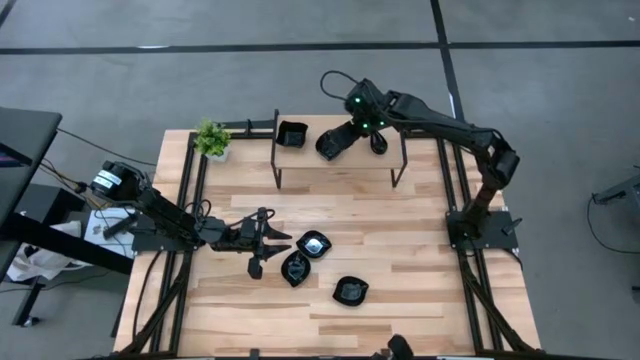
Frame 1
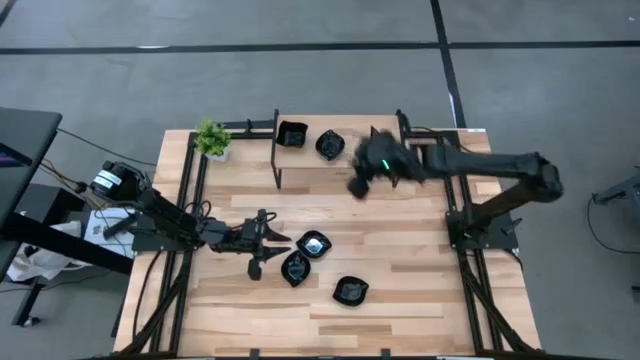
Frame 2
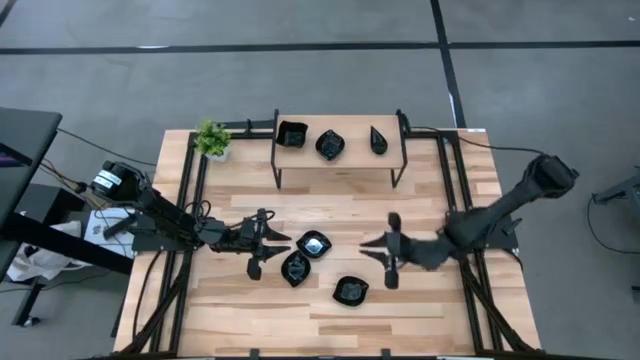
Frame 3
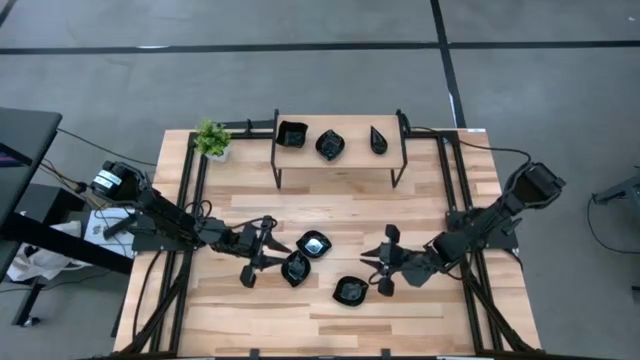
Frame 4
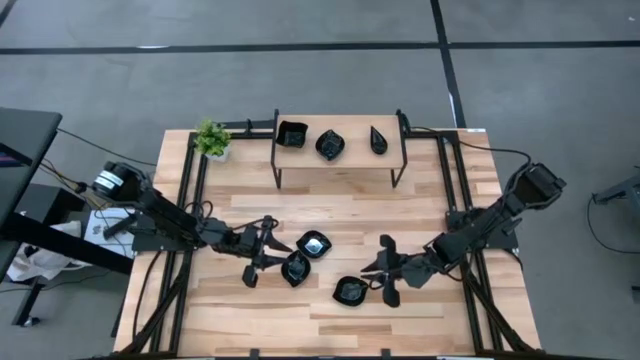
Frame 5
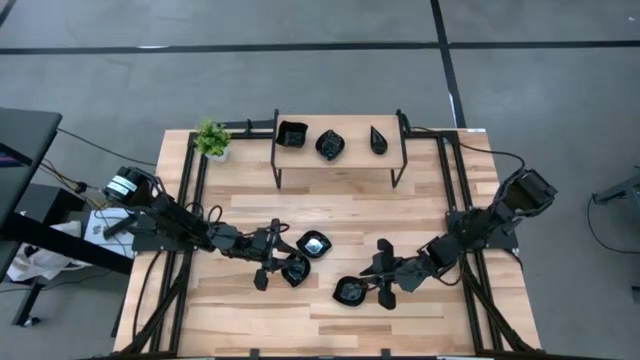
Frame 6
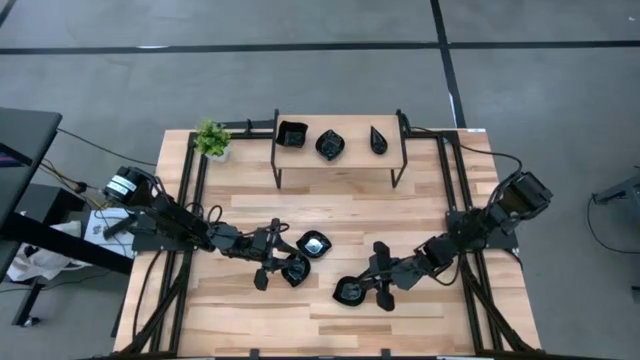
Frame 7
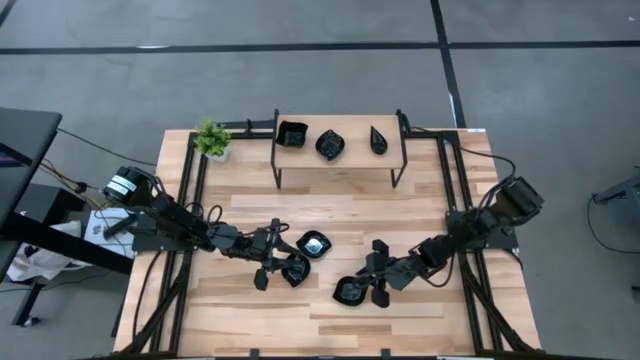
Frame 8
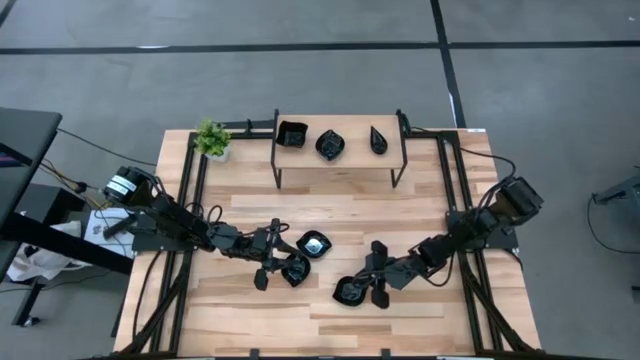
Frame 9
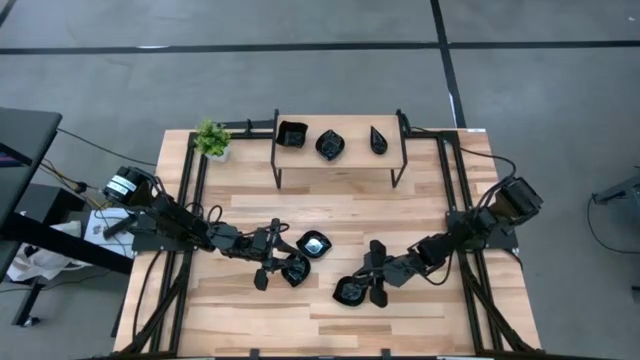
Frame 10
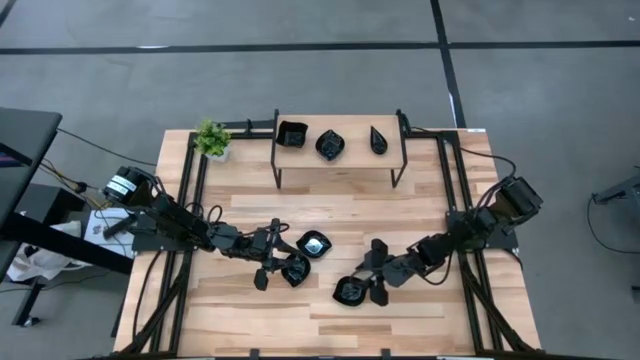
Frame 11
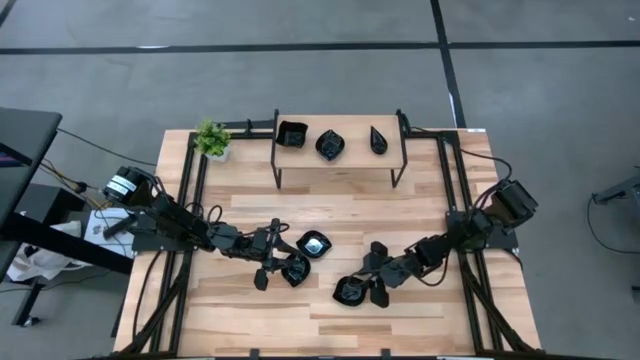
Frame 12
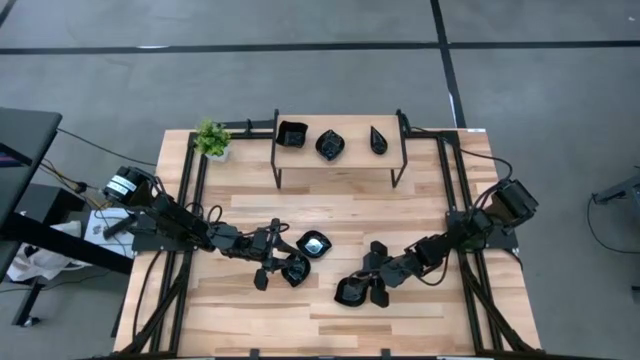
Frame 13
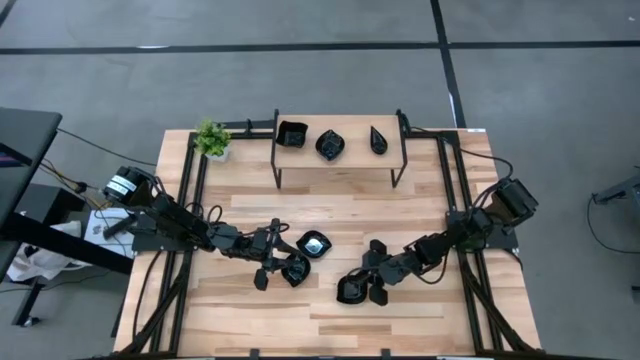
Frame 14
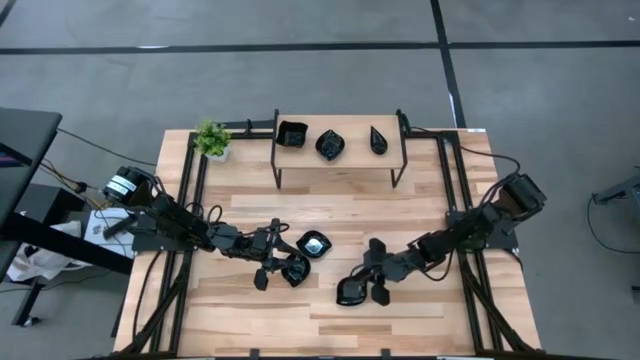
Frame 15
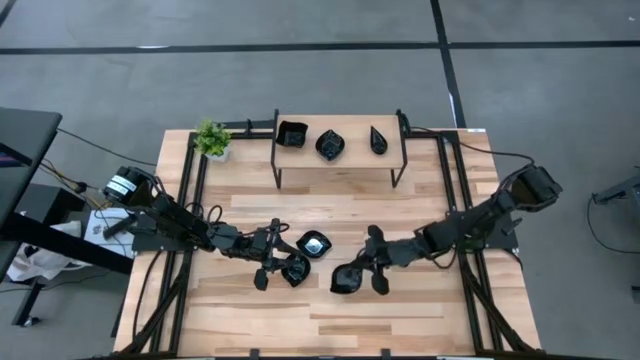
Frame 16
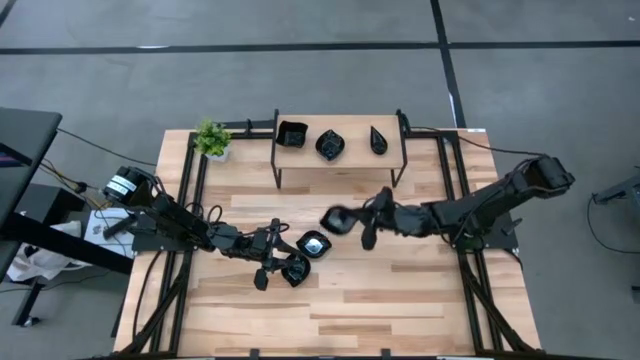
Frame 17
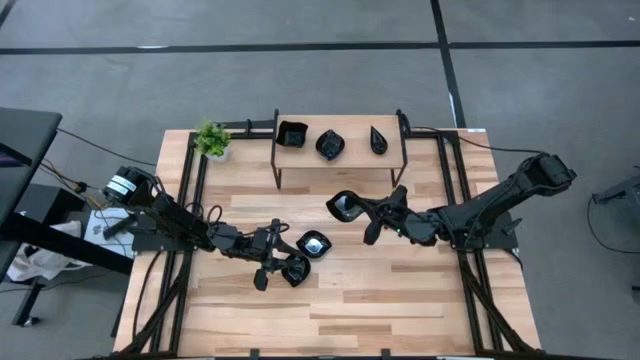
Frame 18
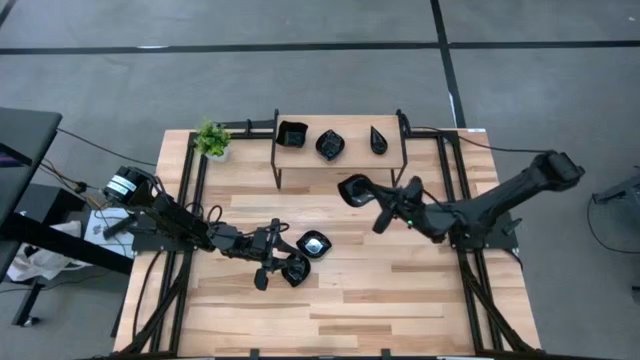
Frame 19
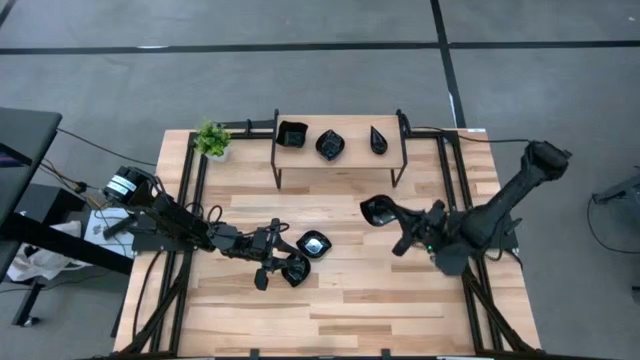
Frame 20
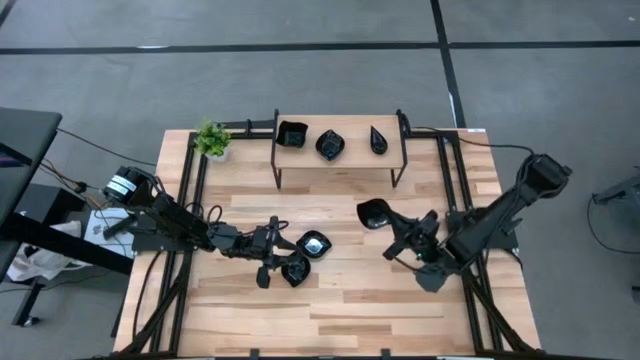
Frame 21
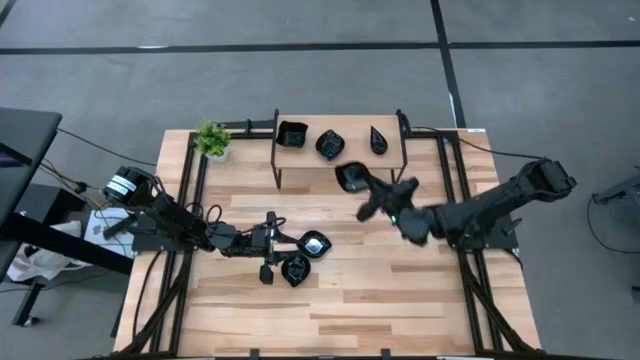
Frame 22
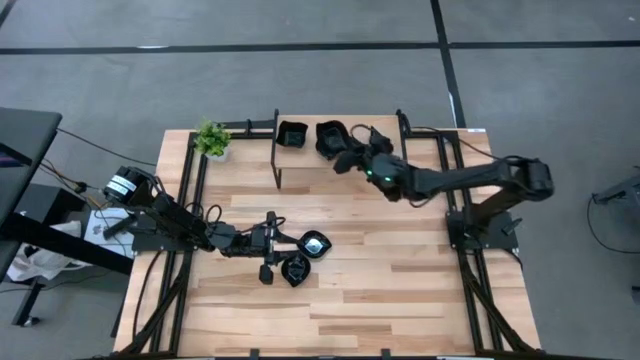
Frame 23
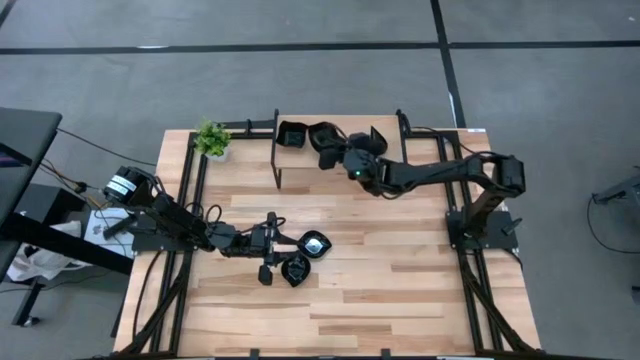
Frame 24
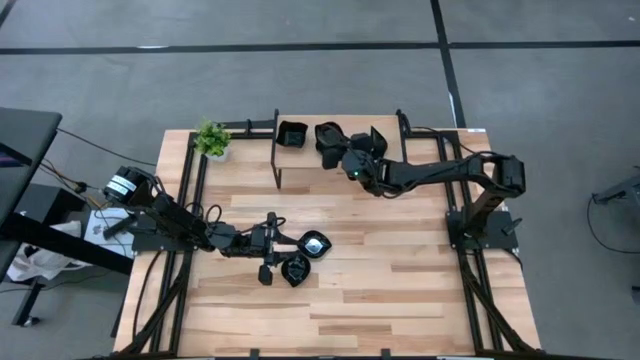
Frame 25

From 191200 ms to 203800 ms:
Task: Pick & Place Mini shaped plates
Stack the black leaf shaped plate on top of the black leaf shaped plate on the shelf

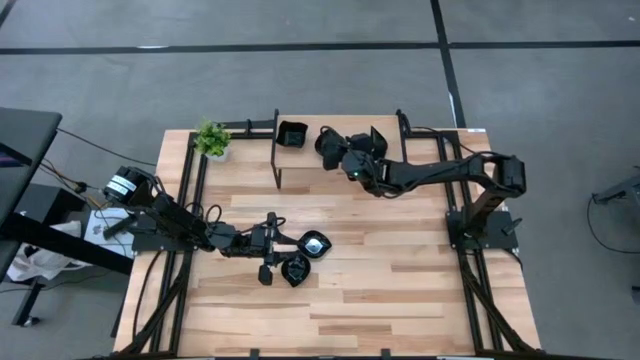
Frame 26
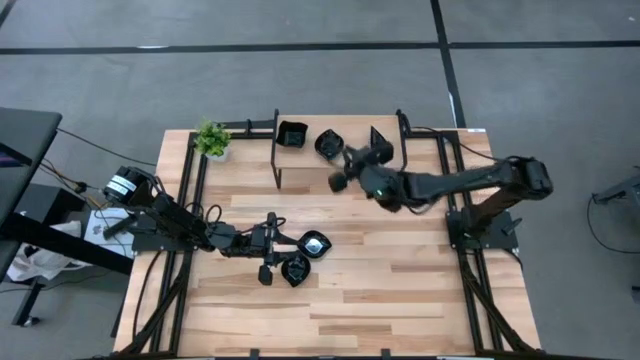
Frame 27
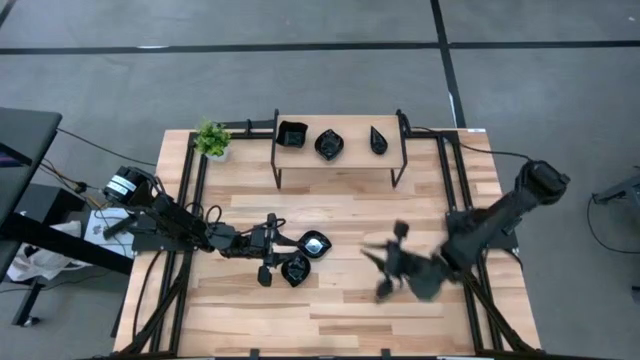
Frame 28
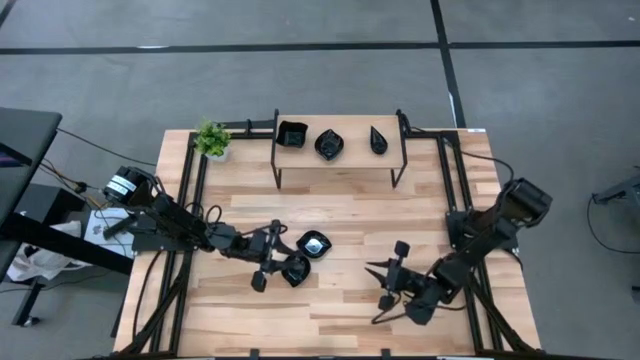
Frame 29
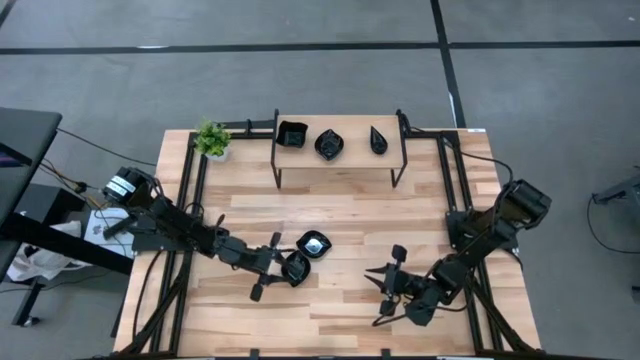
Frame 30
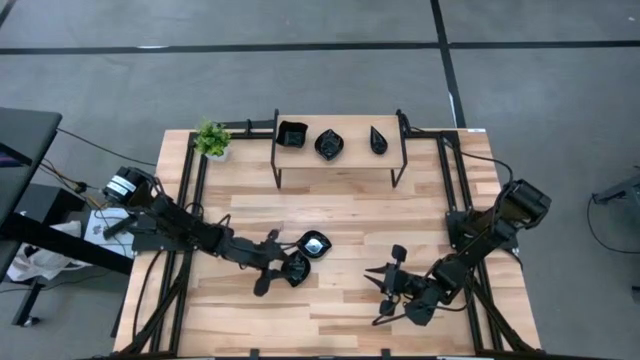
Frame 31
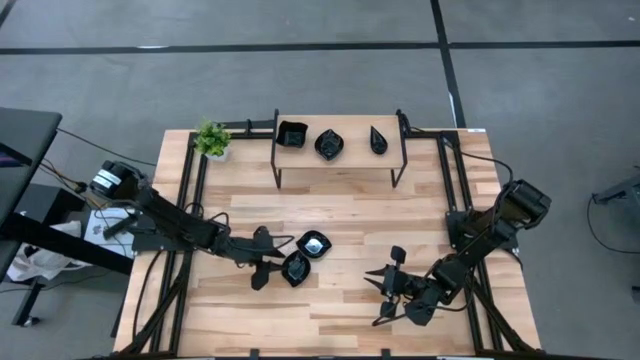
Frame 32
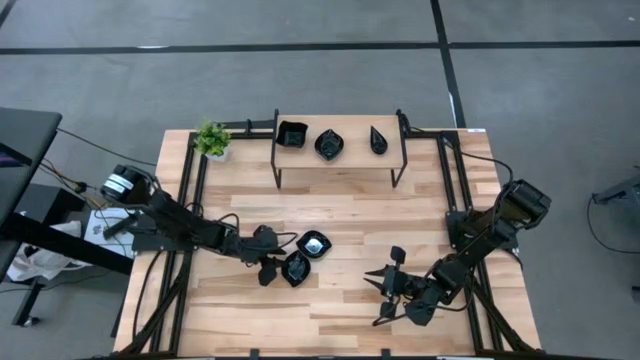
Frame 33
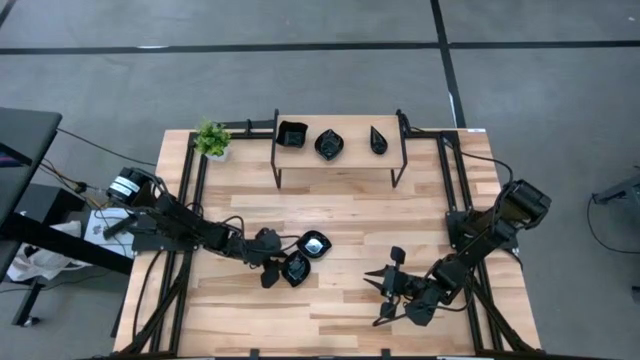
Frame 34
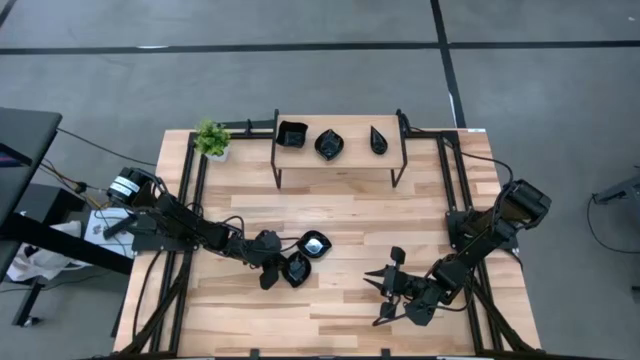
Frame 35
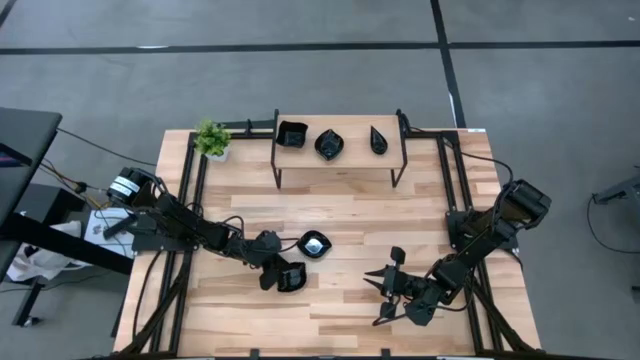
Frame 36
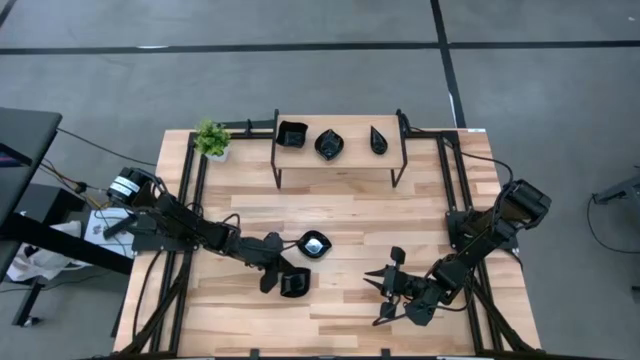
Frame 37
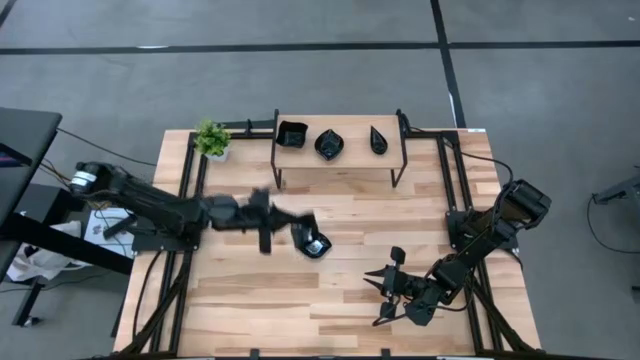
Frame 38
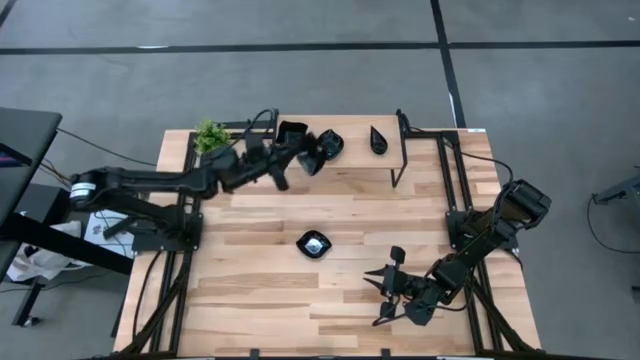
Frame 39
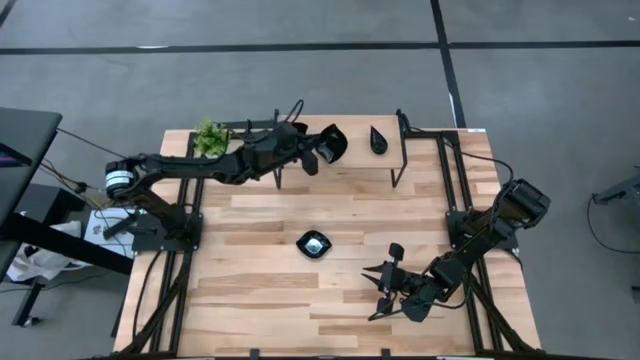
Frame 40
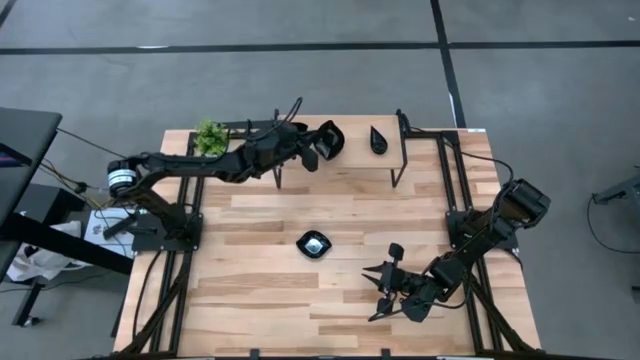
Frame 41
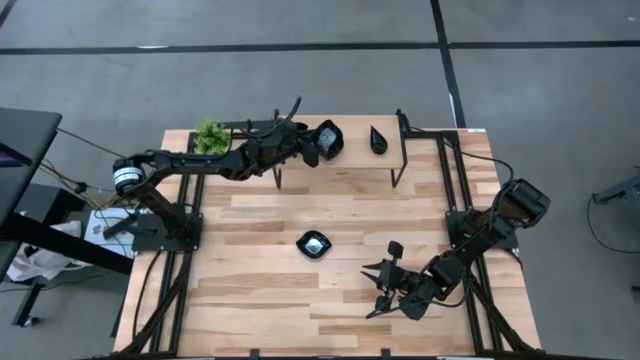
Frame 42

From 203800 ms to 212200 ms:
Stack the black leaf shaped plate on top of the black leaf shaped plate on the shelf
